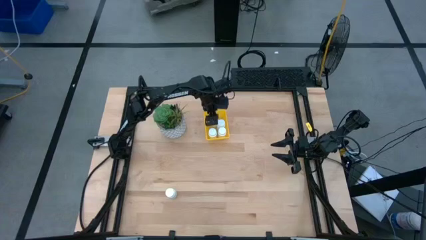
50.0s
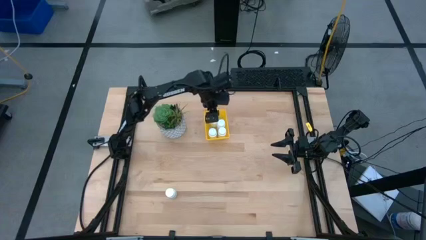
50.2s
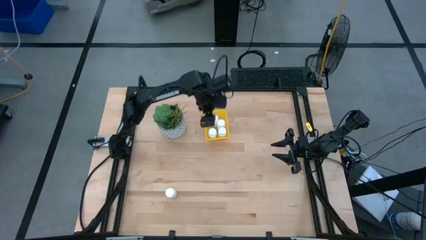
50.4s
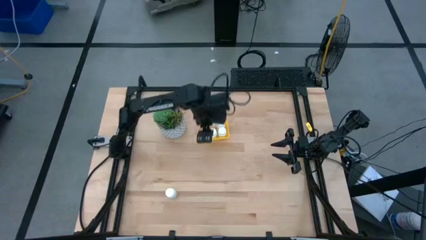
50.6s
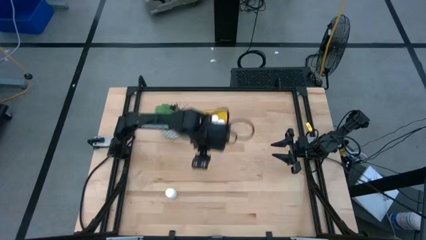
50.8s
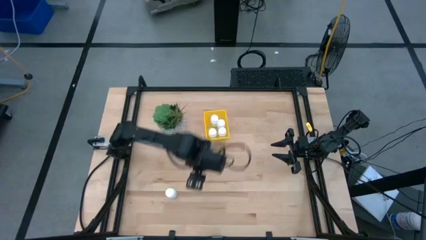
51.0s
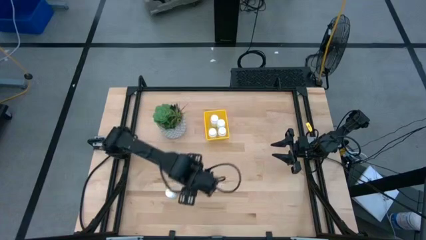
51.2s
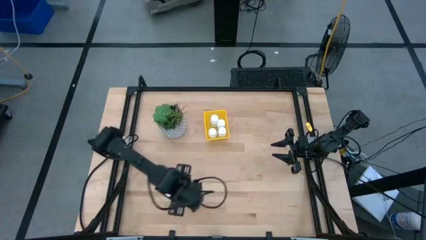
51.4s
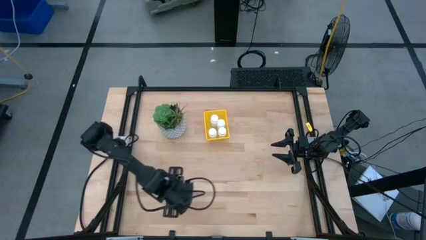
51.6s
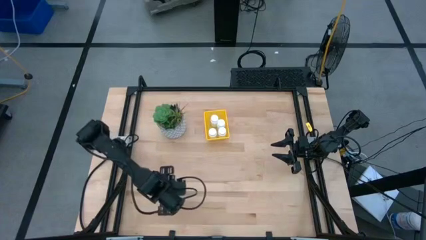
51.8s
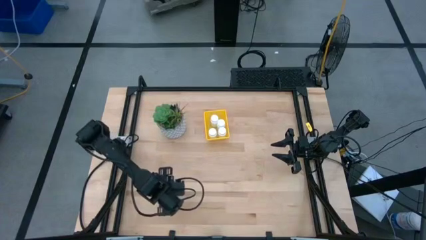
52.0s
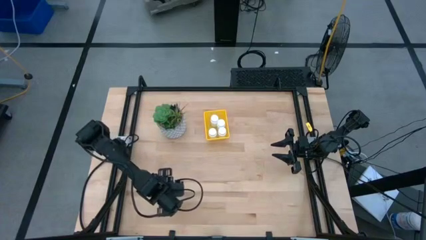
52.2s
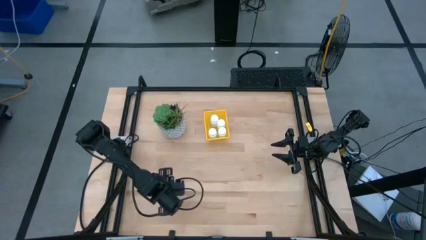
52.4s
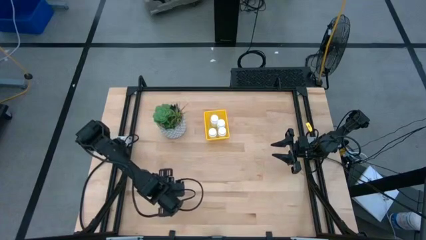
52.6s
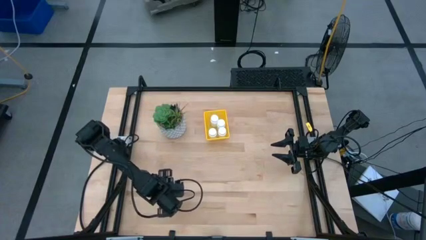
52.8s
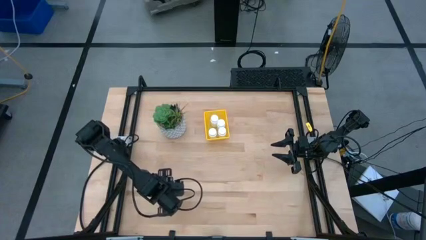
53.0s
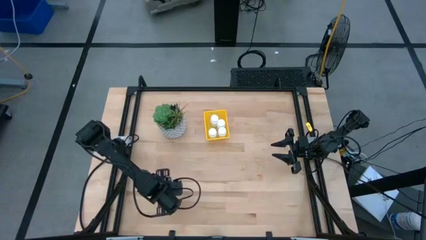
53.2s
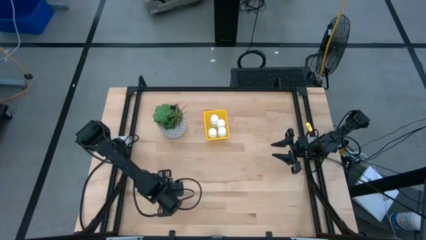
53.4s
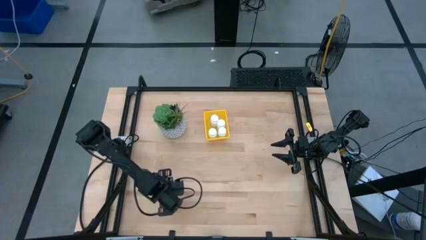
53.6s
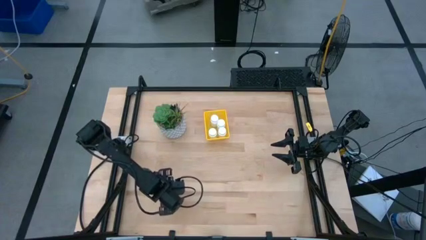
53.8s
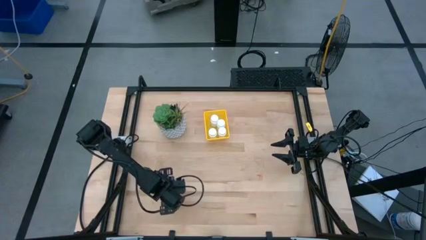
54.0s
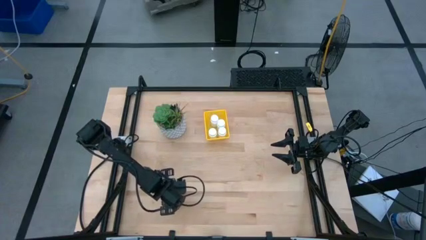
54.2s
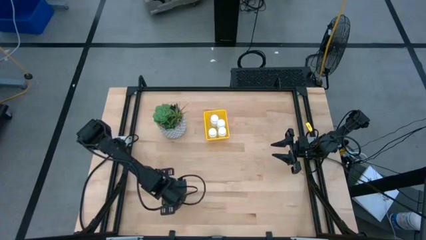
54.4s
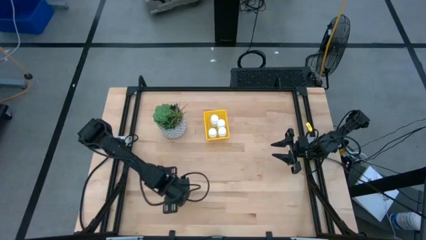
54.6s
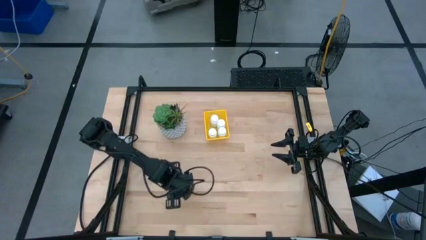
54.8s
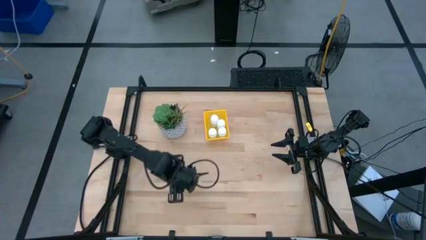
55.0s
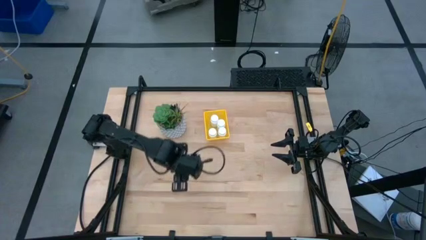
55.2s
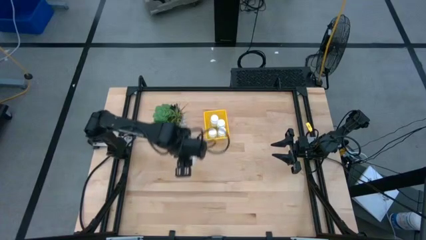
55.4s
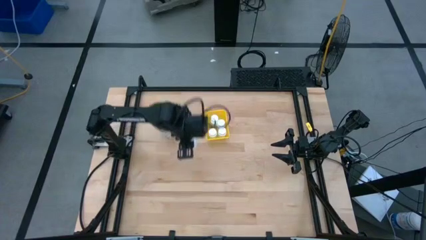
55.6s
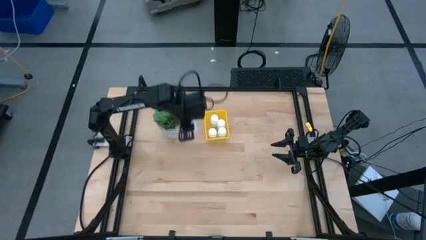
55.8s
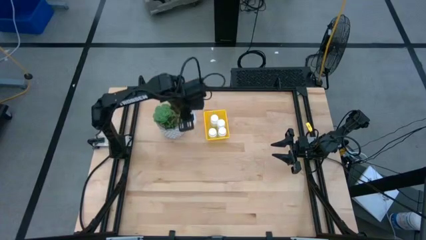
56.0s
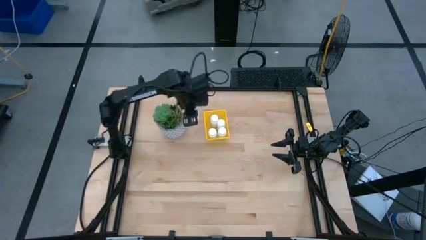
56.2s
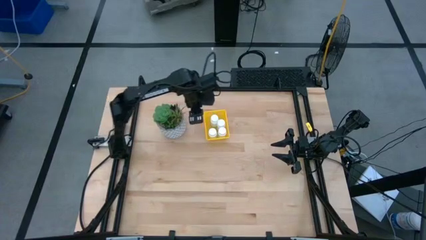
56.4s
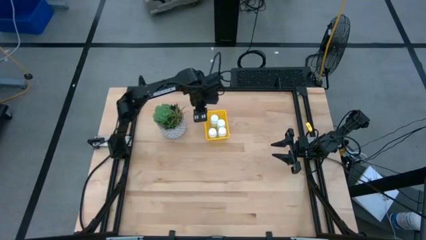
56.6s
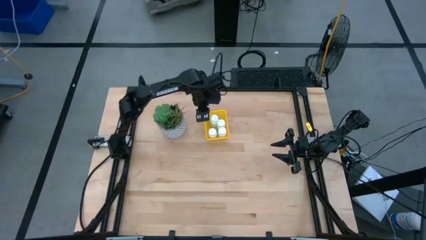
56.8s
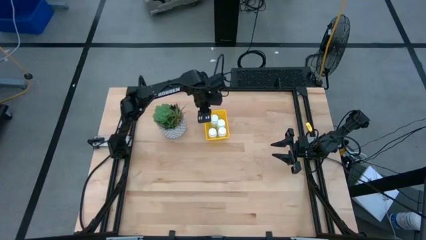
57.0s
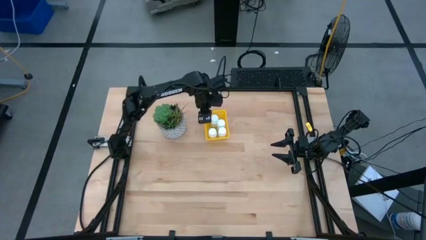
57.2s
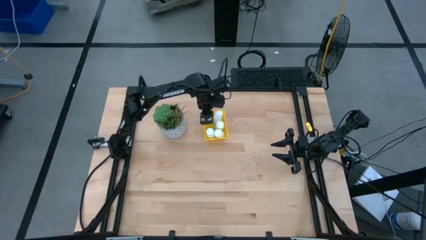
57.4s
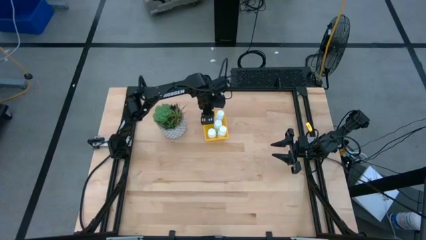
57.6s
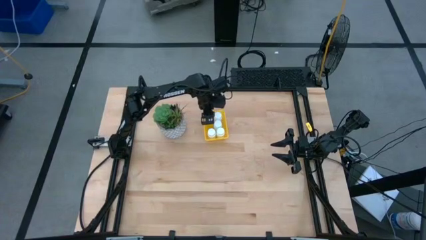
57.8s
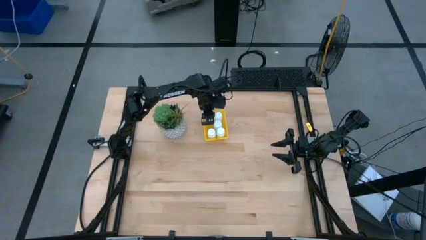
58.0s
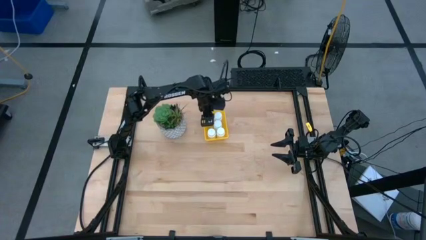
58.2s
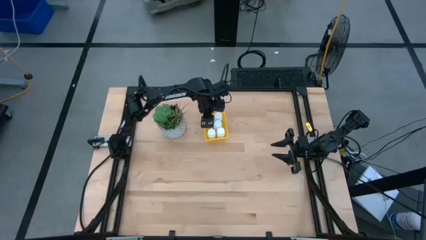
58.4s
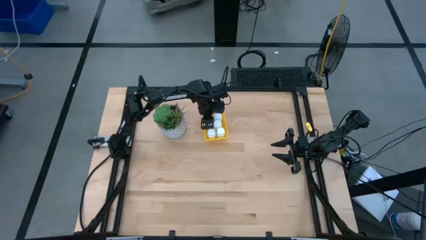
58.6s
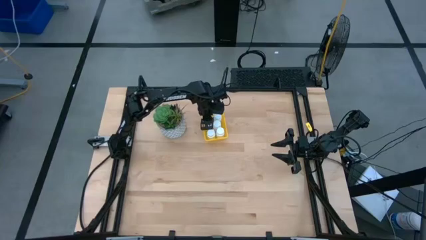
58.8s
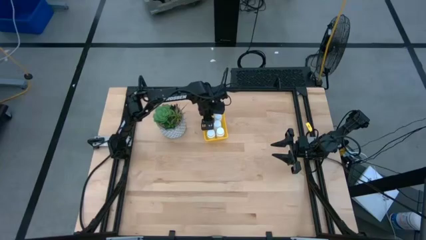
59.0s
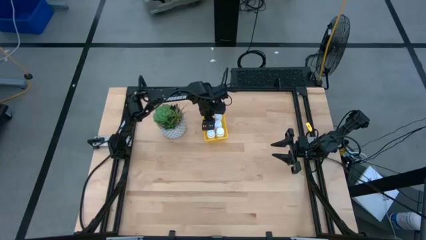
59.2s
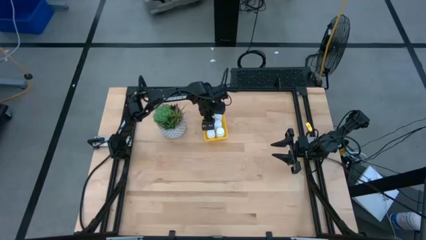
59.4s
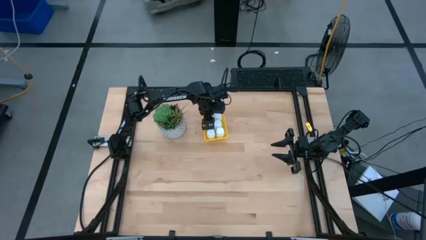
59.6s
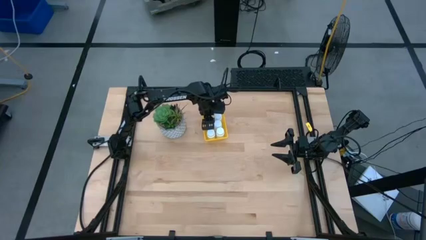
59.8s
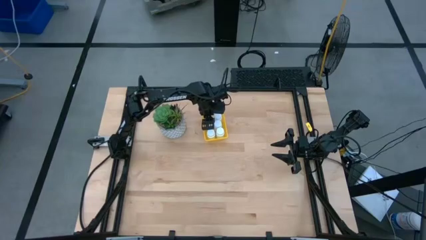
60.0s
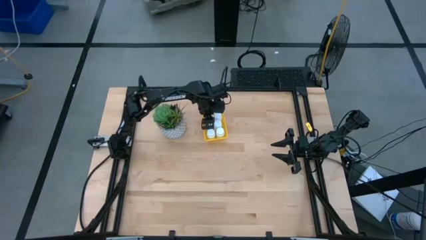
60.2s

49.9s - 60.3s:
Task: Pick and place pill bottles into a basket
Put the white pill bottle into the yellow bin
